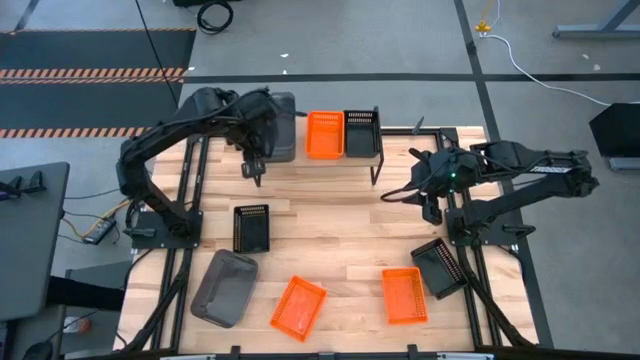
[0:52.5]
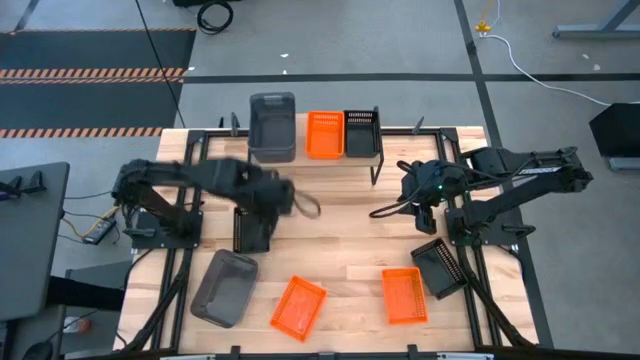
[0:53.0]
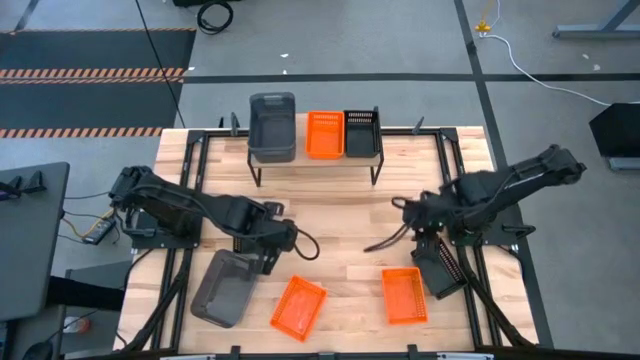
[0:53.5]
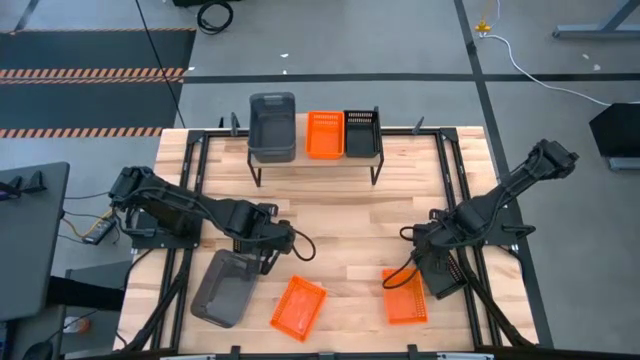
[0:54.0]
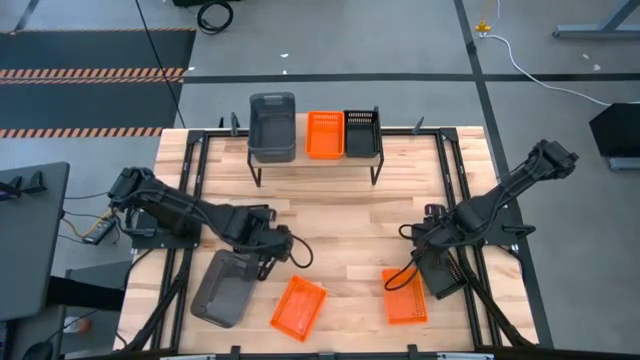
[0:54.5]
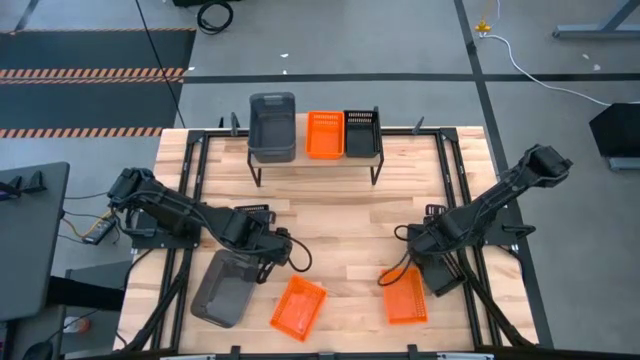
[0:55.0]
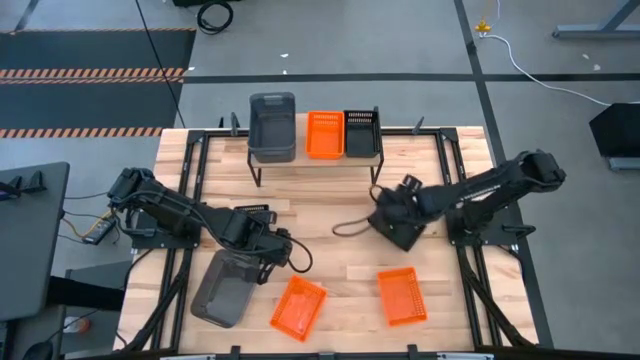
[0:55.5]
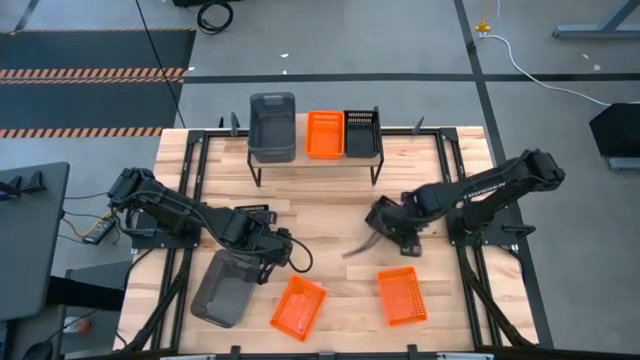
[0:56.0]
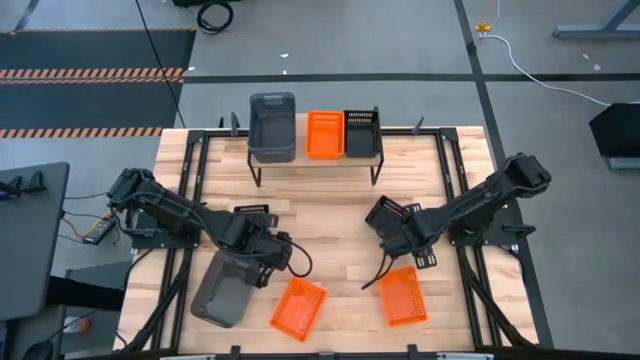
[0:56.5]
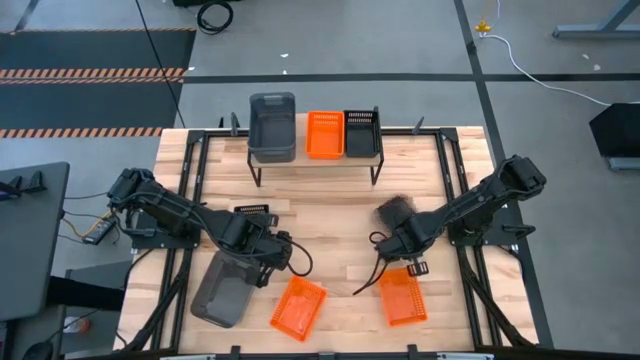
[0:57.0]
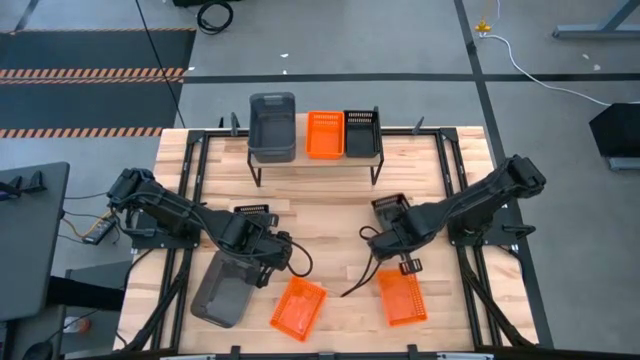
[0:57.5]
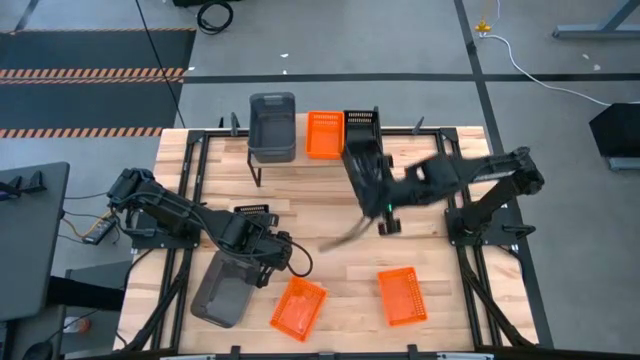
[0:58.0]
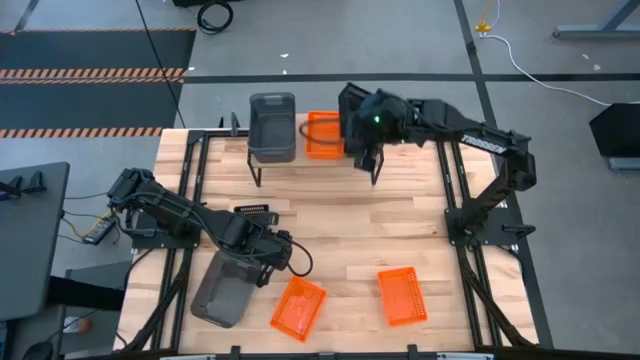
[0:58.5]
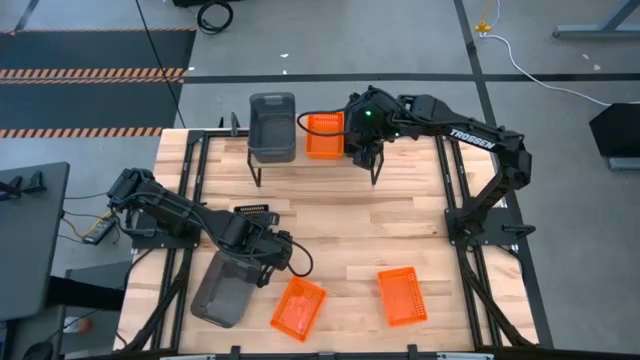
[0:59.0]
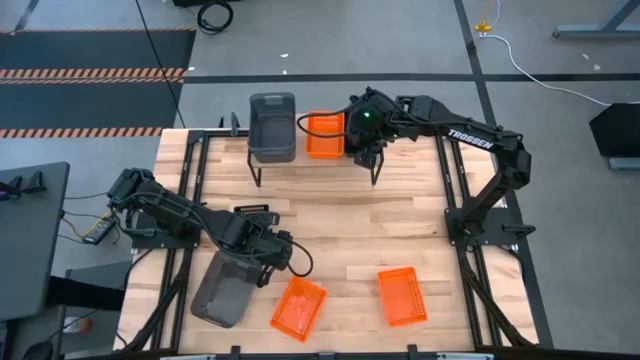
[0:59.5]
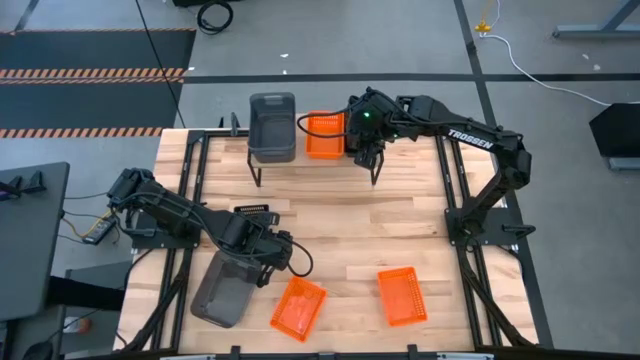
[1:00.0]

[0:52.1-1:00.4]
Task: Stack baskets on shelf by color
Stack the right black basket on top of the black basket on the shelf

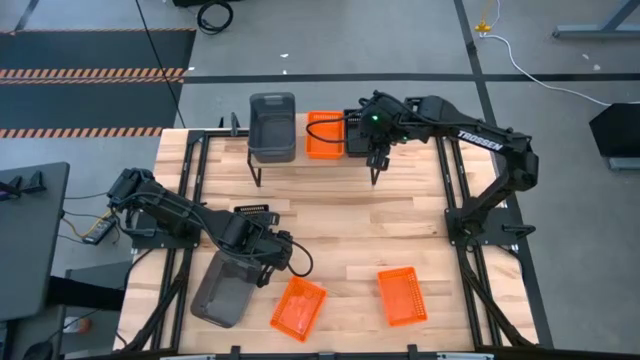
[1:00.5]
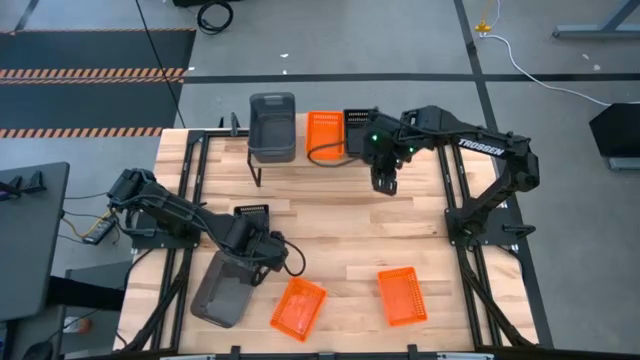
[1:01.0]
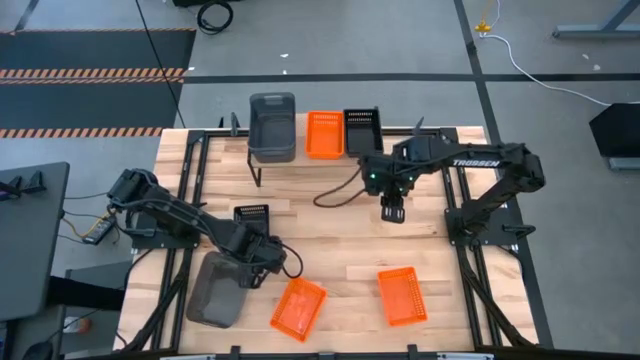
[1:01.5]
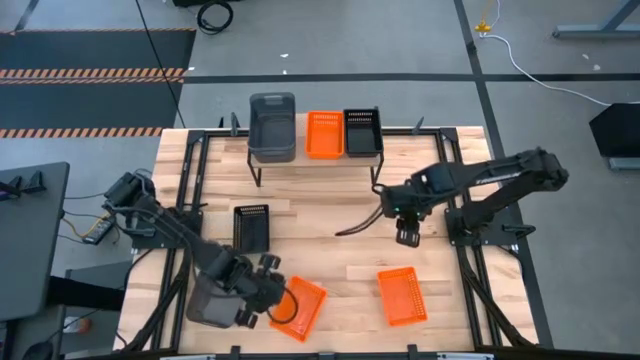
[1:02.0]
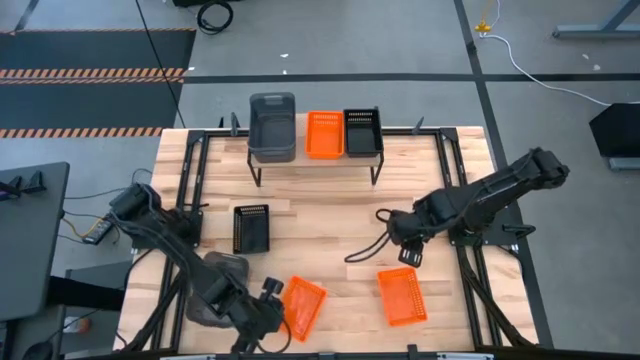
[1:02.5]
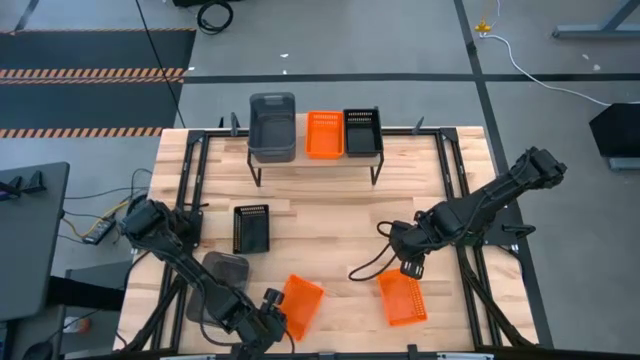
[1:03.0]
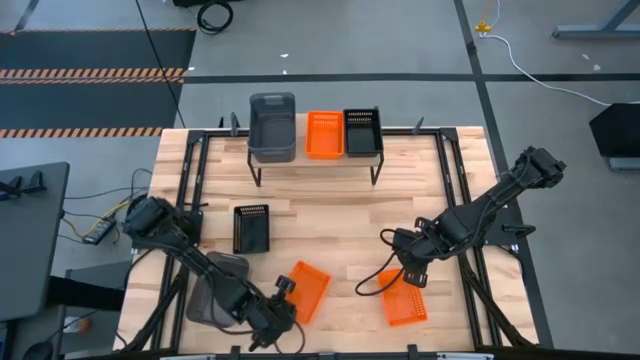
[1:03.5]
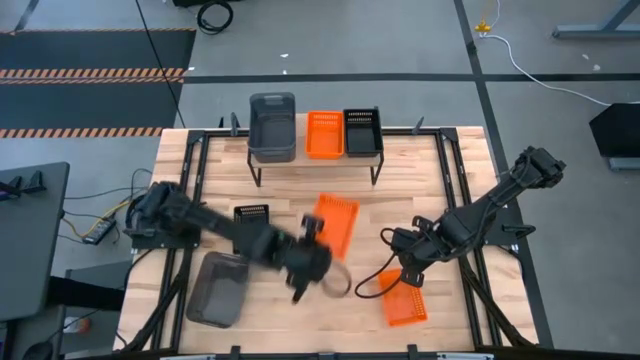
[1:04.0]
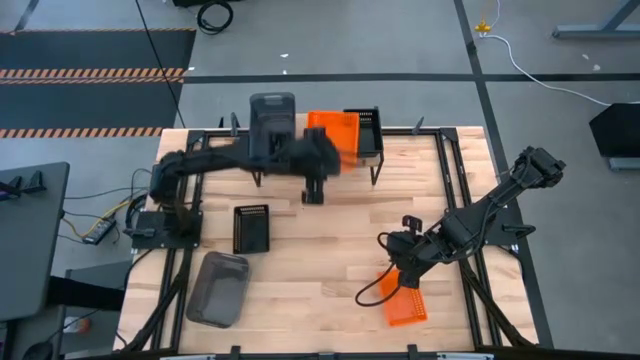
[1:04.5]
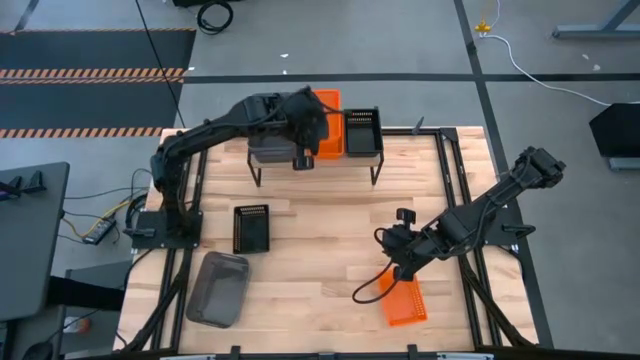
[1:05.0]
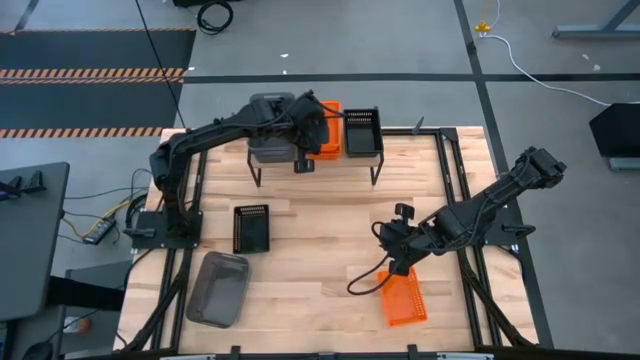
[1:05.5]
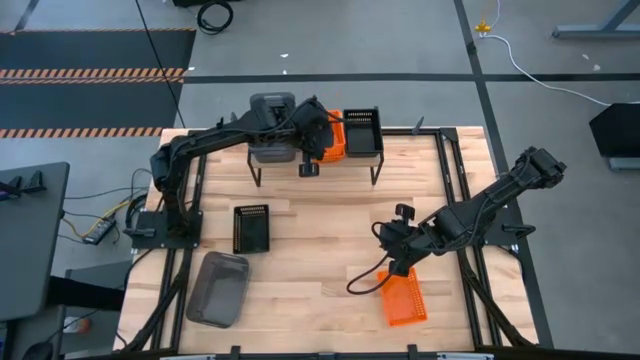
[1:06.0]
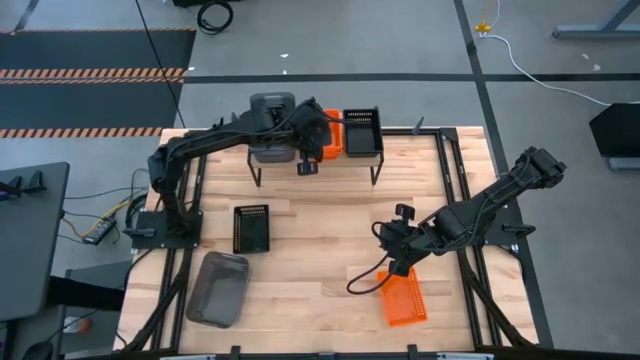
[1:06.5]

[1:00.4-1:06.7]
Stack the left orange basket on the top of the orange basket on the shelf

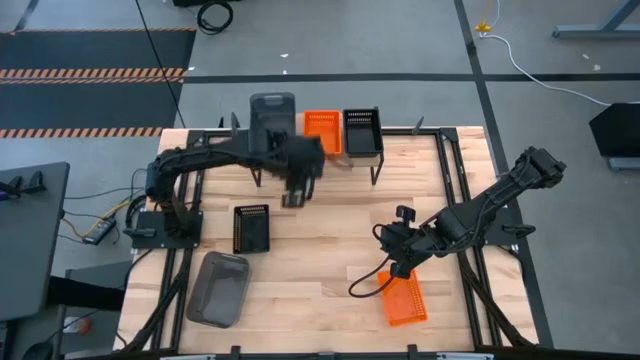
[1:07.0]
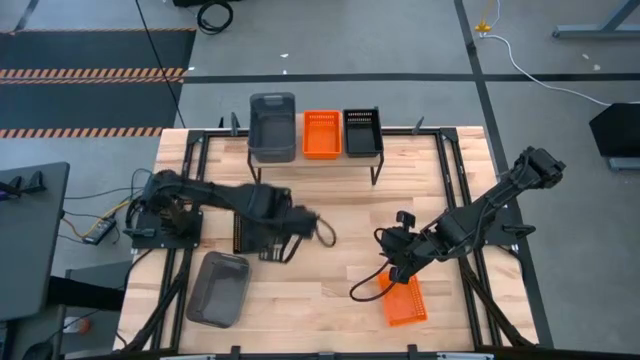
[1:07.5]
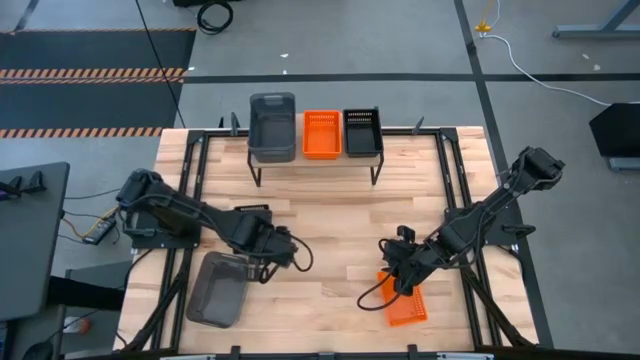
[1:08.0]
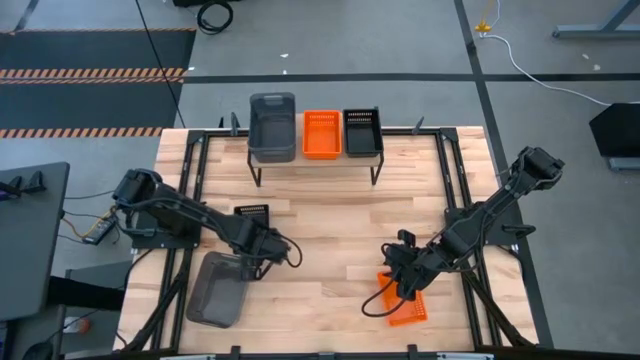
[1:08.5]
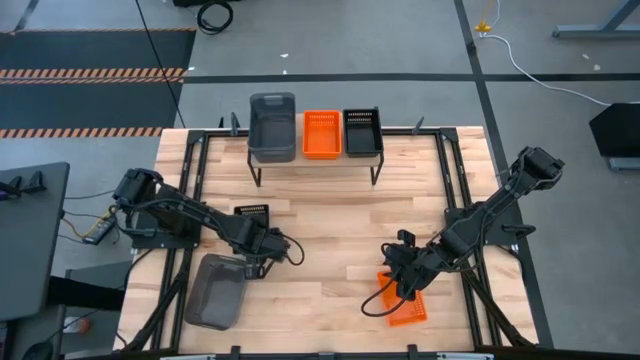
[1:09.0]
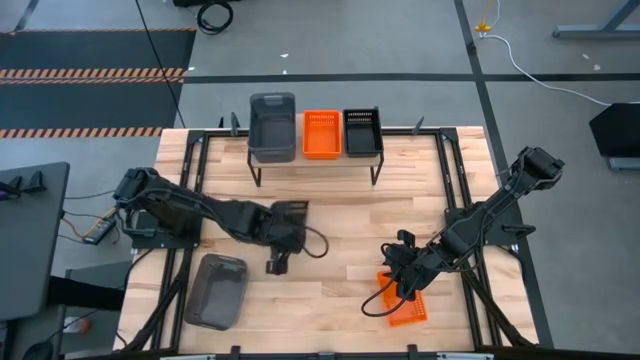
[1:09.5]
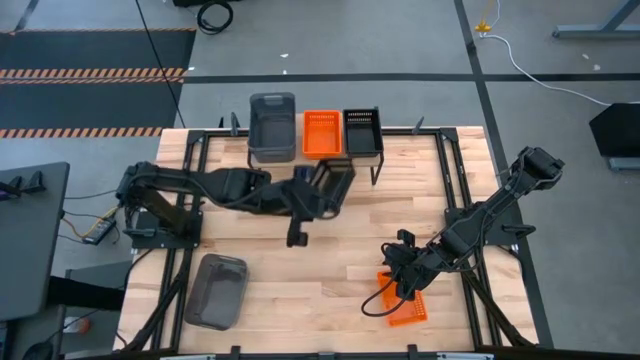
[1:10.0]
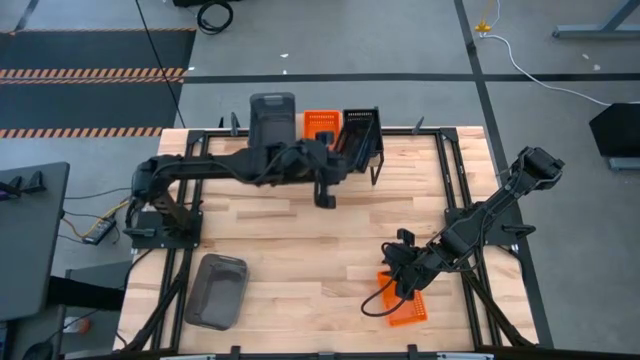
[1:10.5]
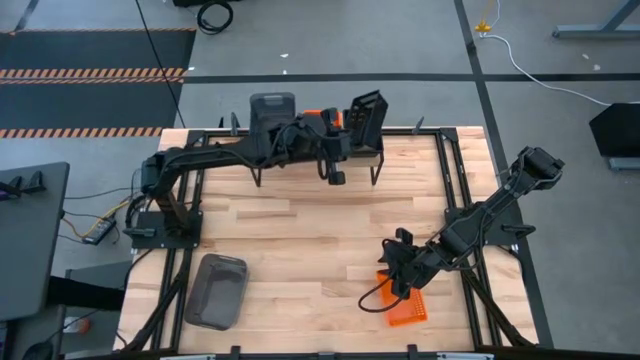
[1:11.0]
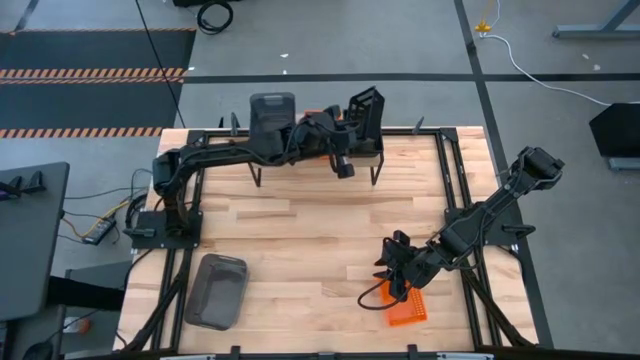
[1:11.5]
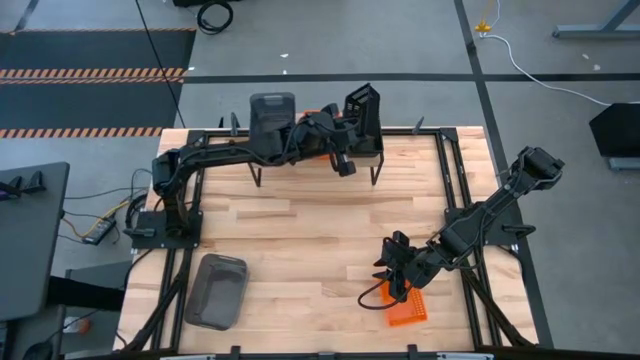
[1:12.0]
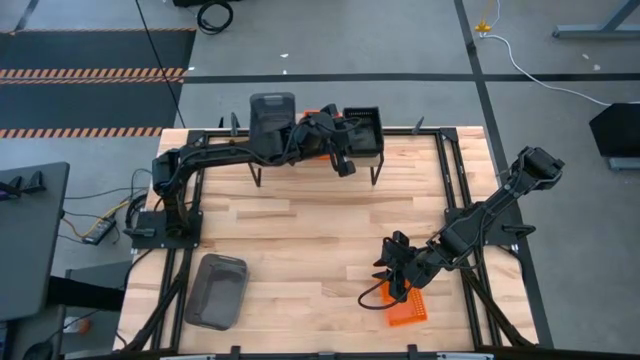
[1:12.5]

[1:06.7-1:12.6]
Stack the black basket on top of the black basket on the shelf
